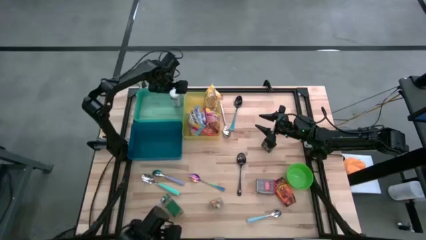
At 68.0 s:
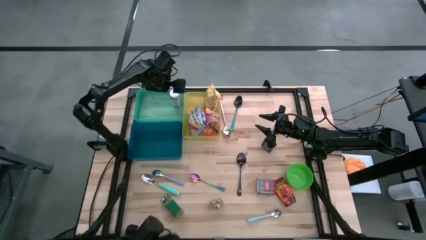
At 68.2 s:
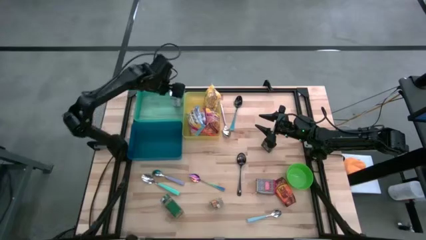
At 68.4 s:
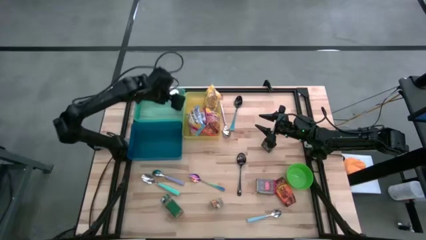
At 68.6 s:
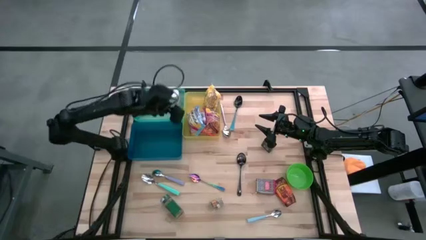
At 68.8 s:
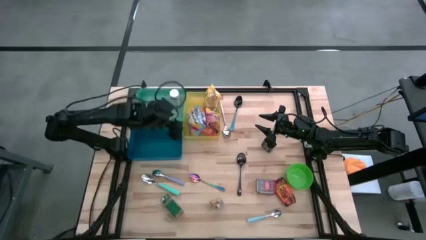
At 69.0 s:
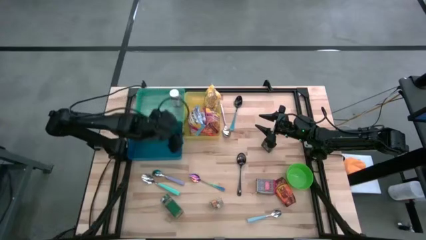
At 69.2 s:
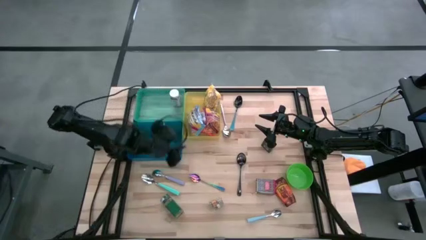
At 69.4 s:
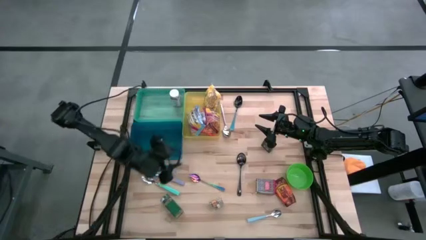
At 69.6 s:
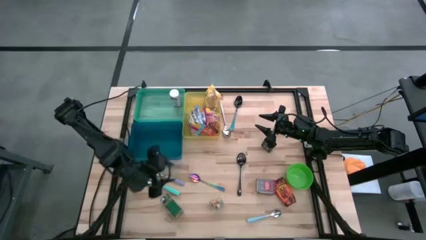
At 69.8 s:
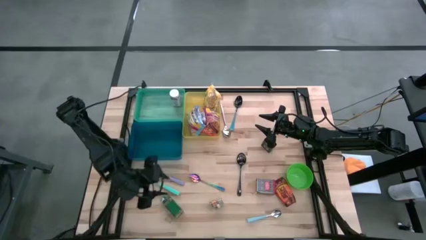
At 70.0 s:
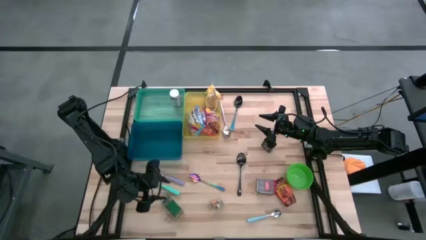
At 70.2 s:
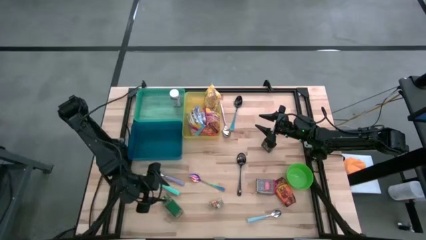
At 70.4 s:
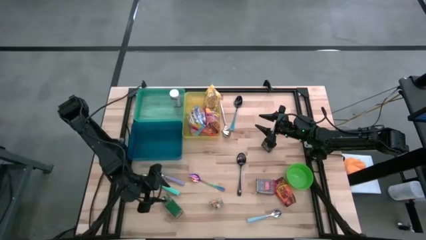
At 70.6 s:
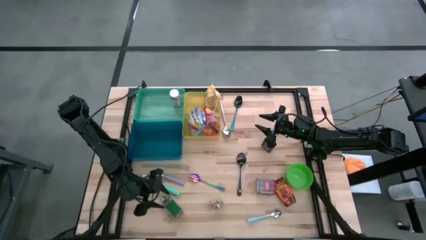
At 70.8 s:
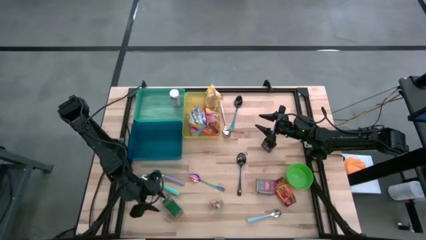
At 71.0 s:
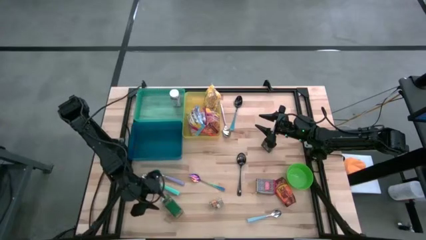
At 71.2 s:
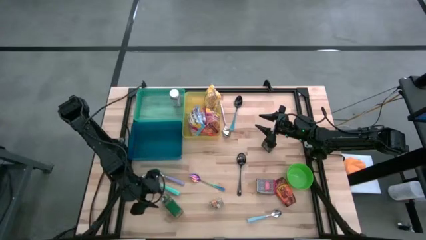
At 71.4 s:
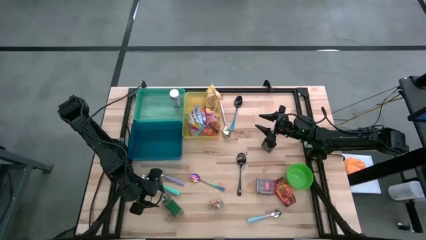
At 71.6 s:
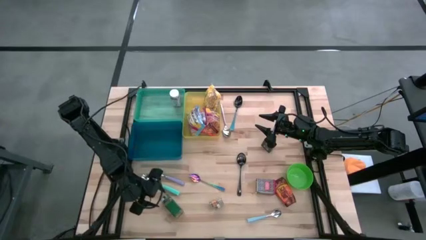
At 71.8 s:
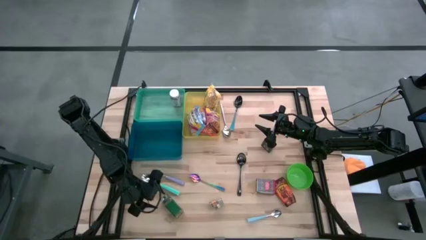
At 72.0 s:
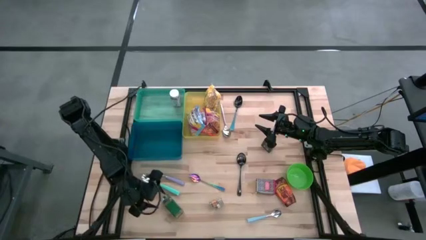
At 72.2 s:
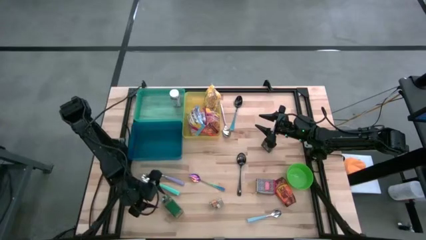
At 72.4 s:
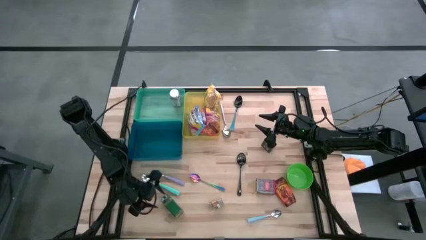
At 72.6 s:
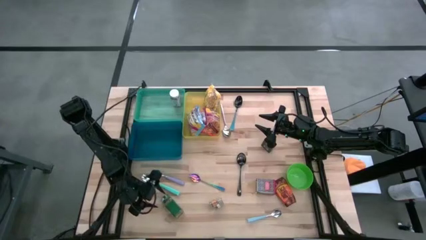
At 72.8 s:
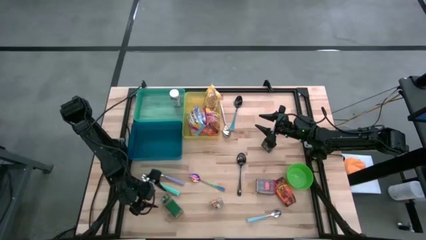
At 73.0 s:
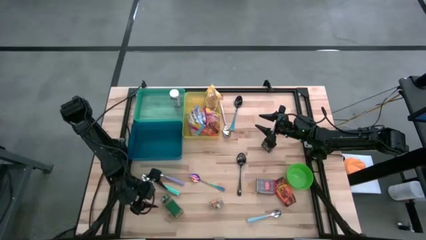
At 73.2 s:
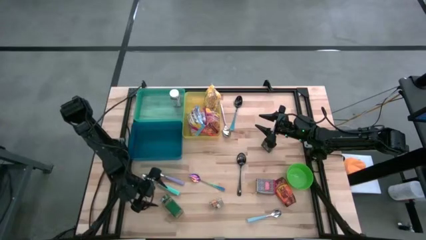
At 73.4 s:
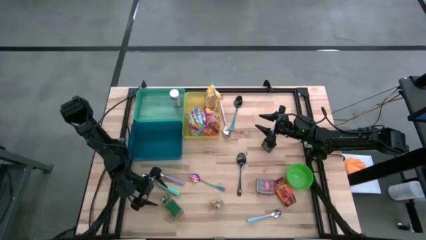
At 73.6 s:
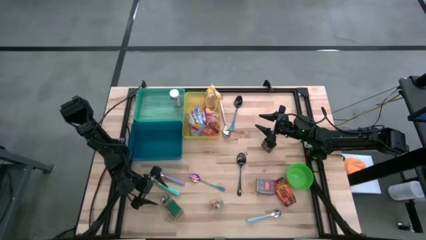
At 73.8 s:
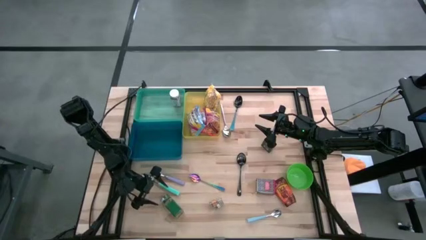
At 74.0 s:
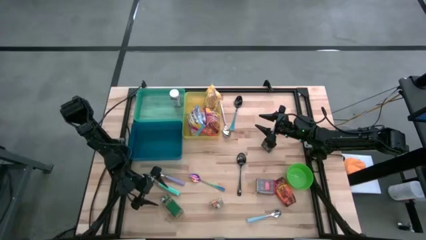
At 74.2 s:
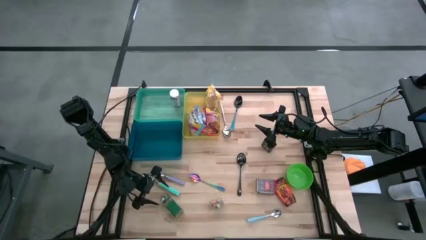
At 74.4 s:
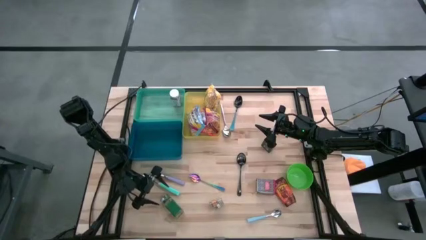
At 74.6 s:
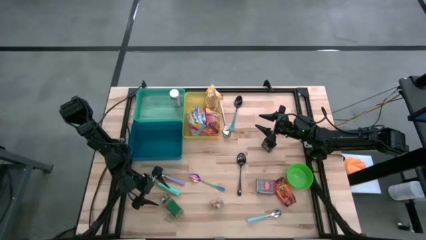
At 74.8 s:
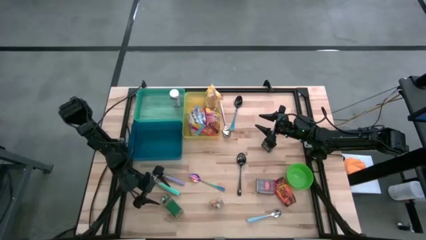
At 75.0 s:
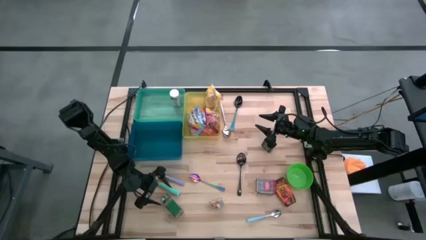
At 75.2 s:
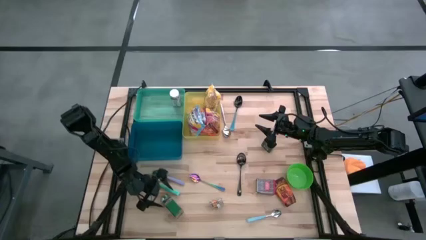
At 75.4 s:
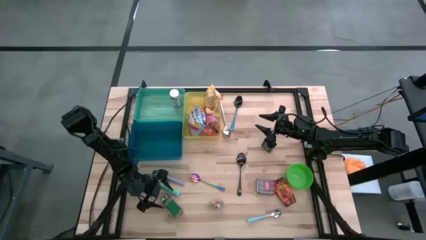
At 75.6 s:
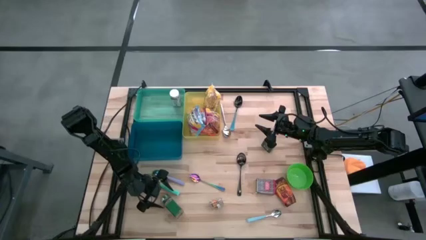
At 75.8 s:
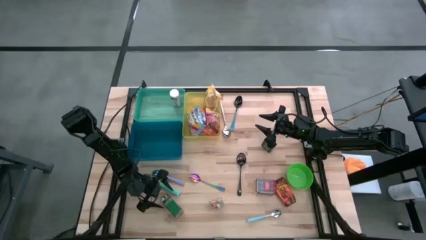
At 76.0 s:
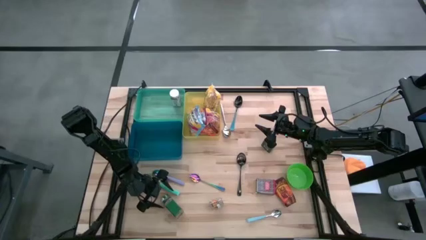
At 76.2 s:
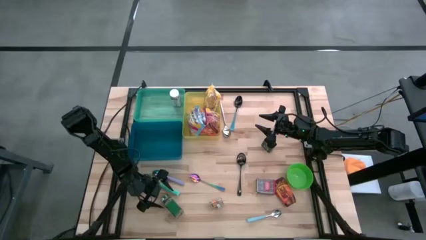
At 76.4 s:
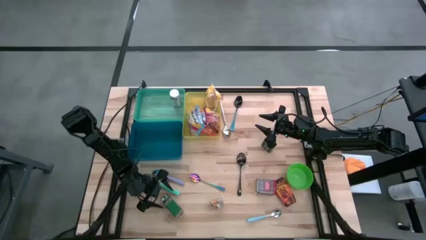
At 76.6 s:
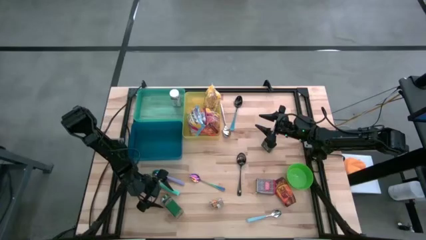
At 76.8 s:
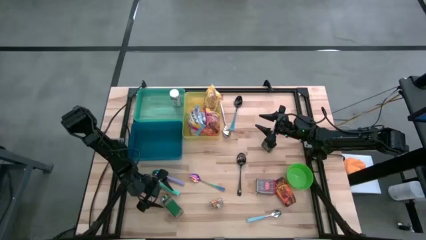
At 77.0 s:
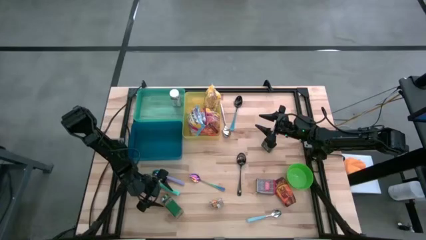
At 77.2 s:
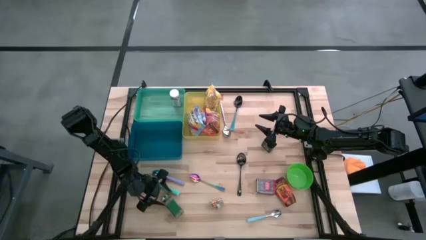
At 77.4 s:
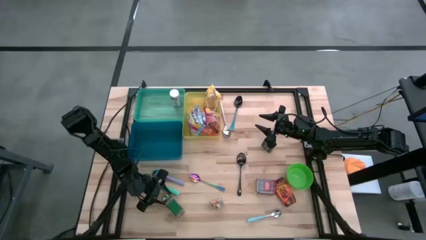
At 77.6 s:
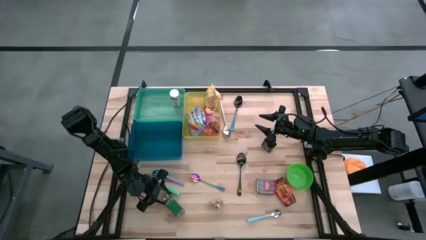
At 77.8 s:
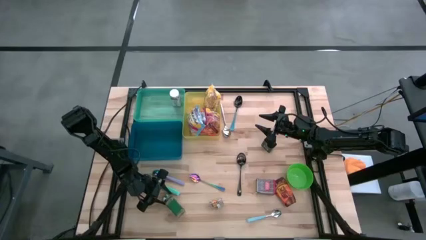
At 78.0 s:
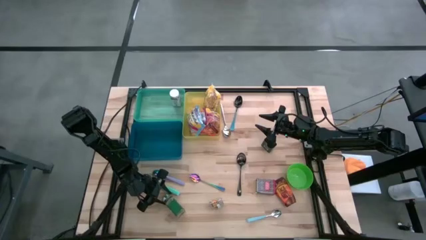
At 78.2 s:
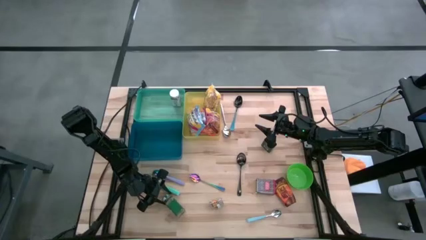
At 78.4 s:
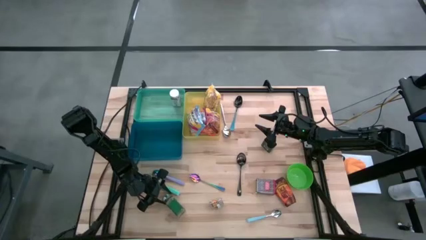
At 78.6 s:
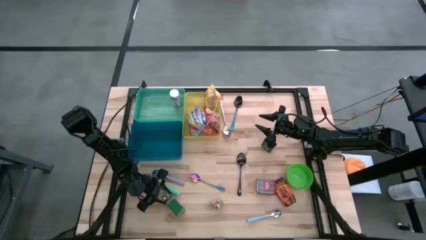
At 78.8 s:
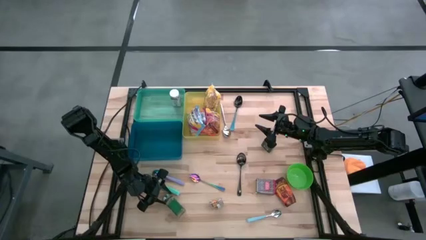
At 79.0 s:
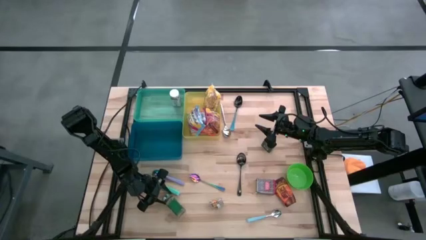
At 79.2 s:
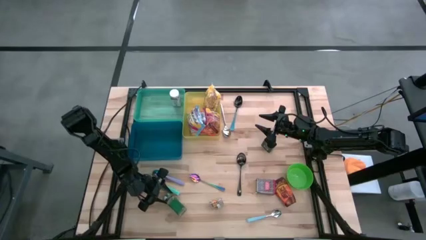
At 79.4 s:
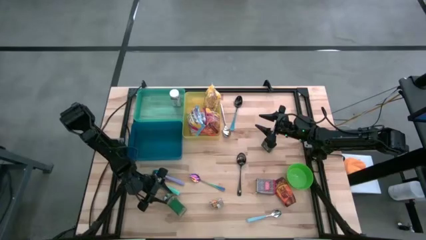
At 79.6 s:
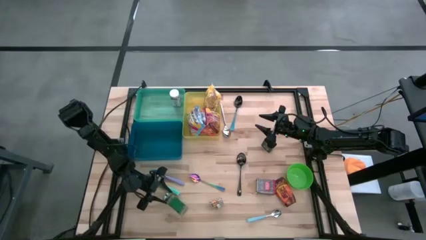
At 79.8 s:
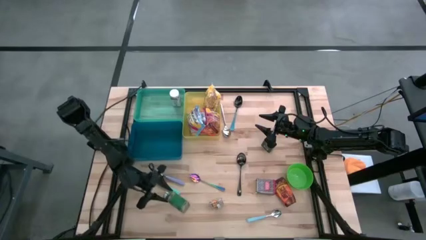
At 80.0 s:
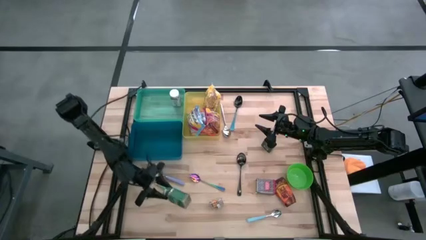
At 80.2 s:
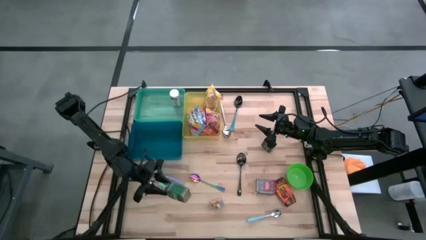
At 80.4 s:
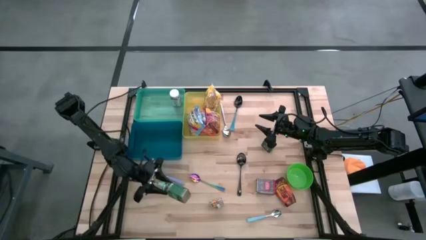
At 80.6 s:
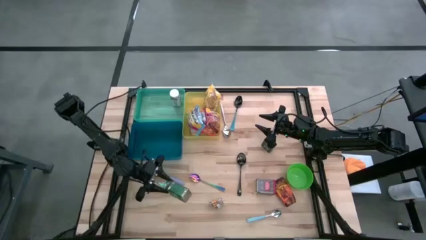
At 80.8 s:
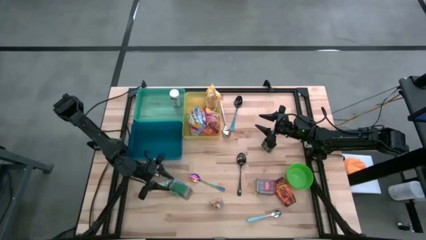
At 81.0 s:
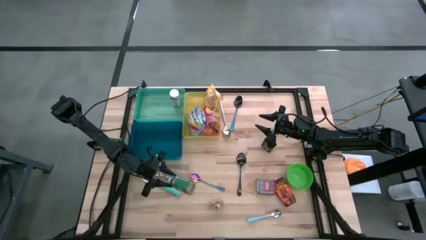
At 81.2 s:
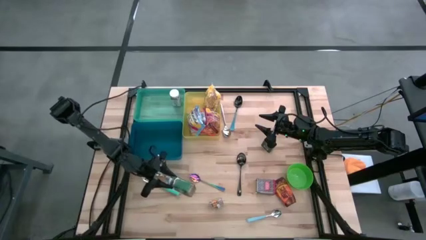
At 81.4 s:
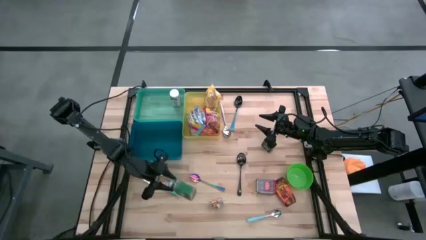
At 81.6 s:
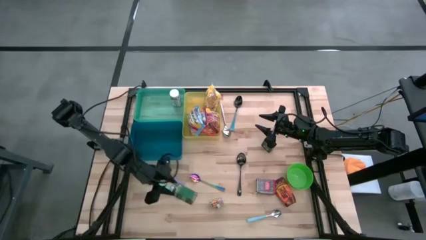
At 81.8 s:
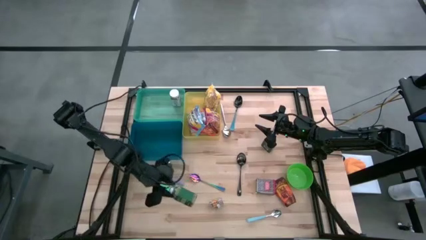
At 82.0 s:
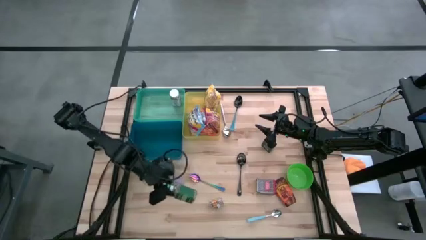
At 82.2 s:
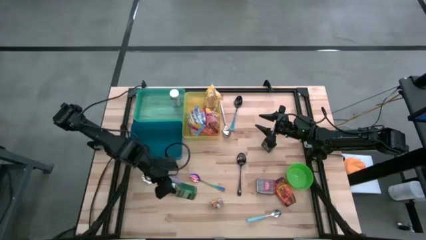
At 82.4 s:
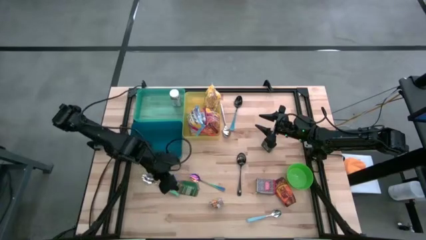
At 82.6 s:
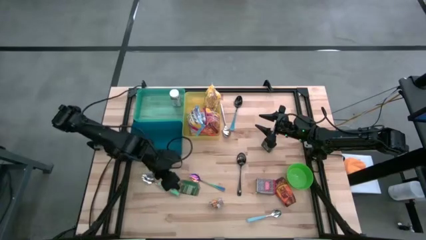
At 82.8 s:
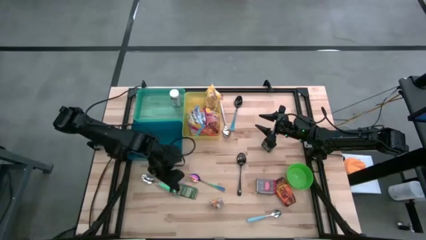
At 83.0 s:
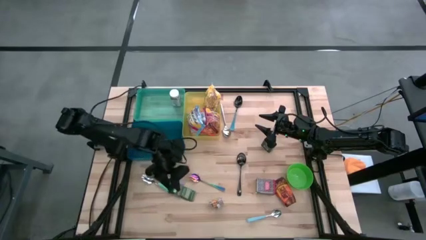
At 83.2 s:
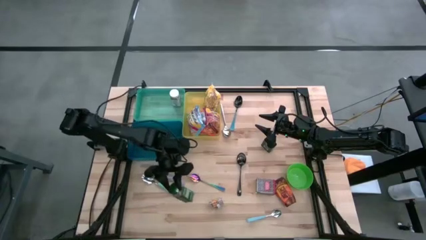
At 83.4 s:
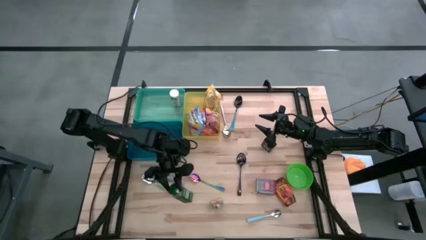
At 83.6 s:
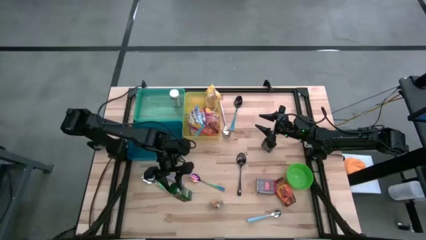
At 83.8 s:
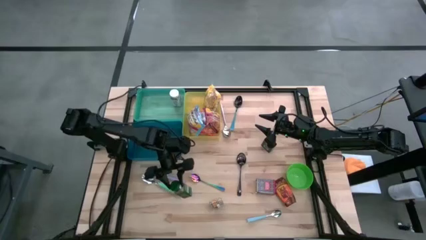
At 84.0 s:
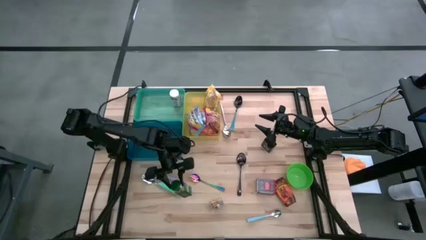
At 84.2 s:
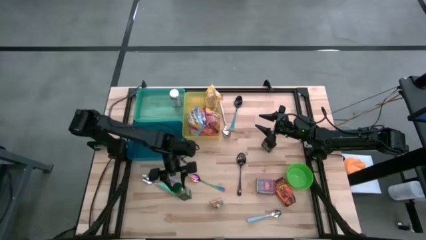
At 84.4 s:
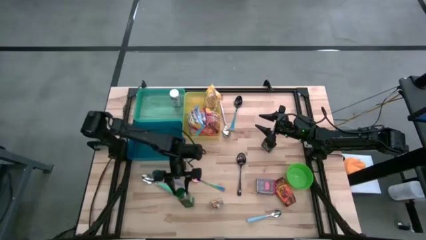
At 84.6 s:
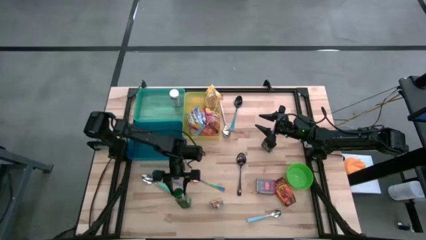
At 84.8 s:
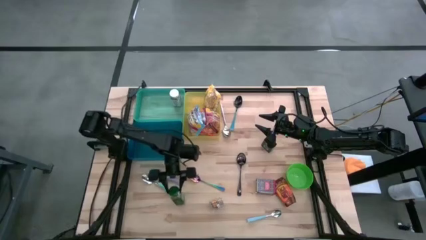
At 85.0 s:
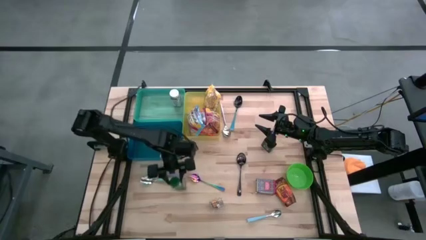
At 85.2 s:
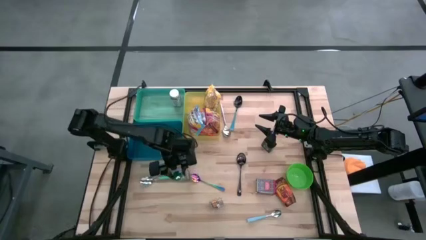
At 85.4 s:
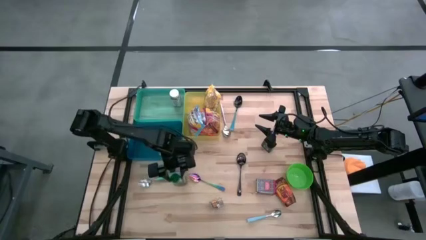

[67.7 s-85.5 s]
Put the green spice bottle into the green bin
